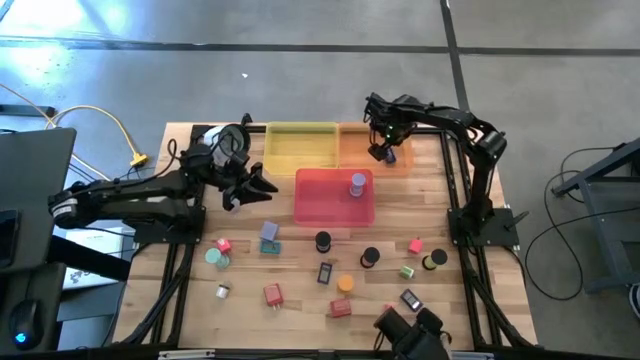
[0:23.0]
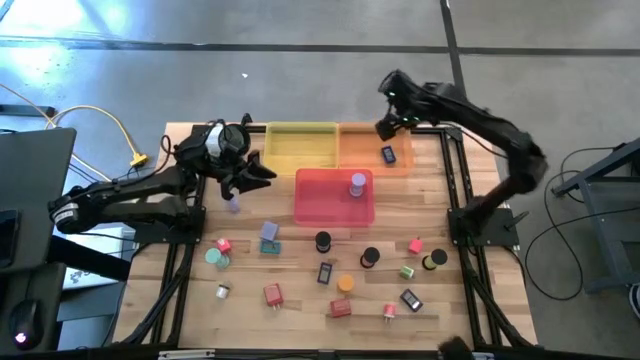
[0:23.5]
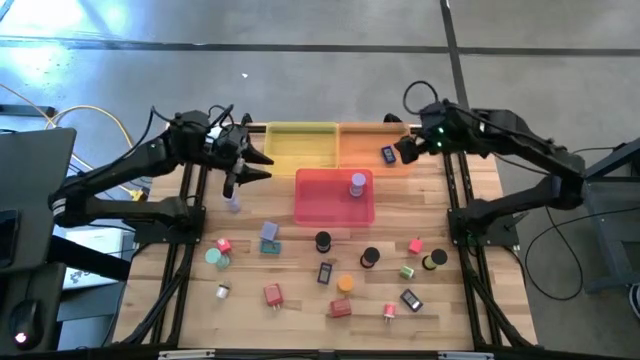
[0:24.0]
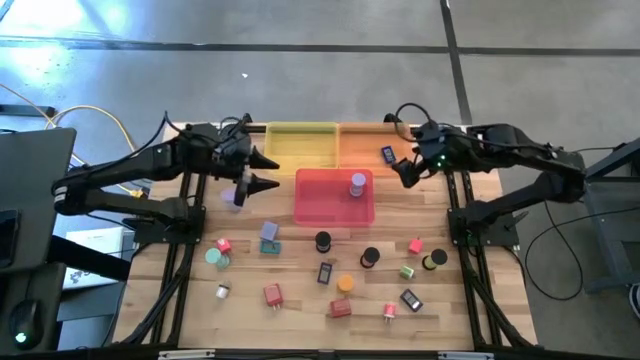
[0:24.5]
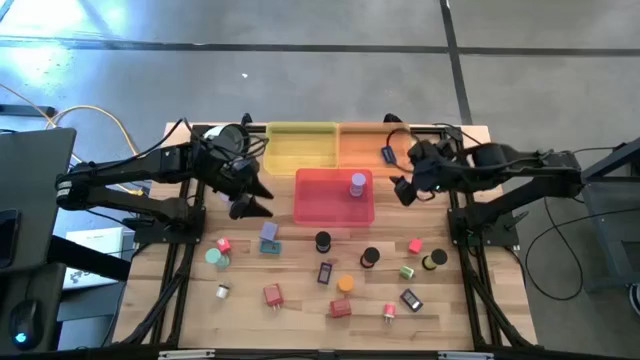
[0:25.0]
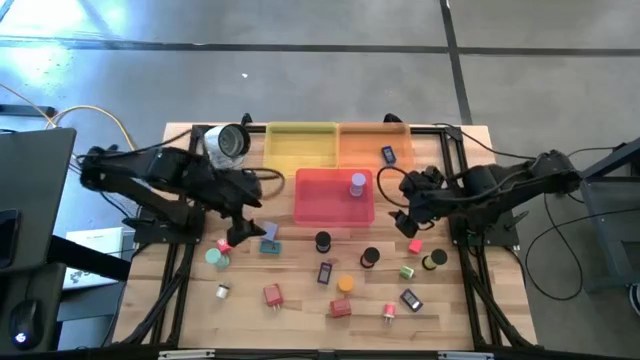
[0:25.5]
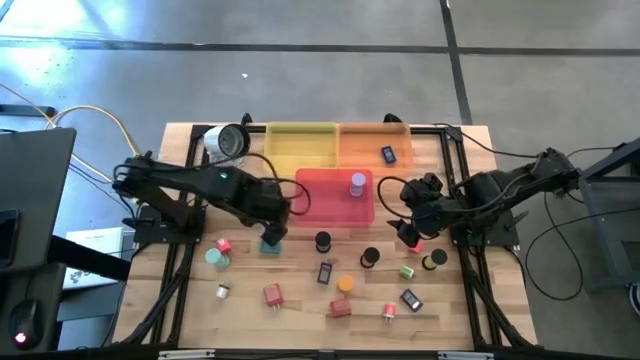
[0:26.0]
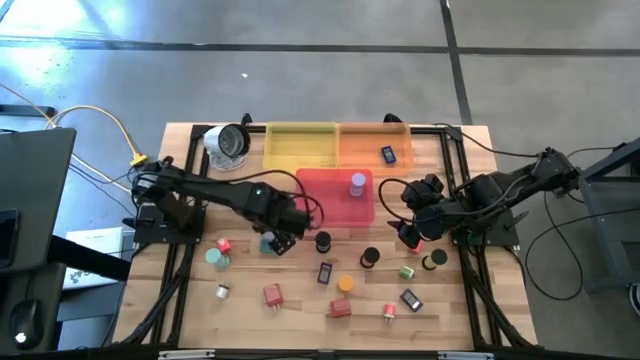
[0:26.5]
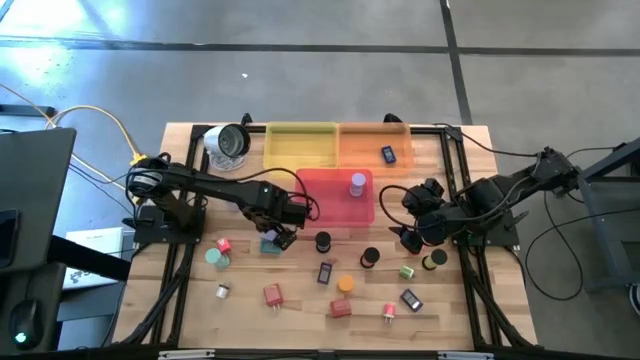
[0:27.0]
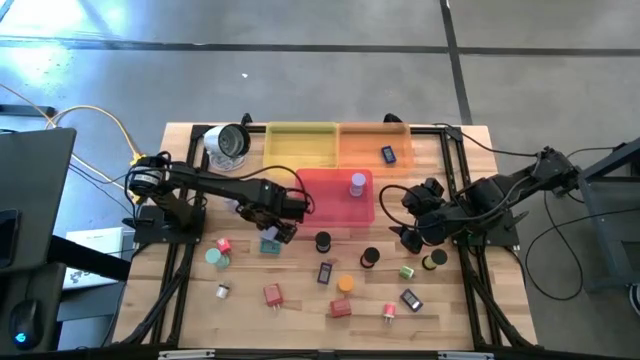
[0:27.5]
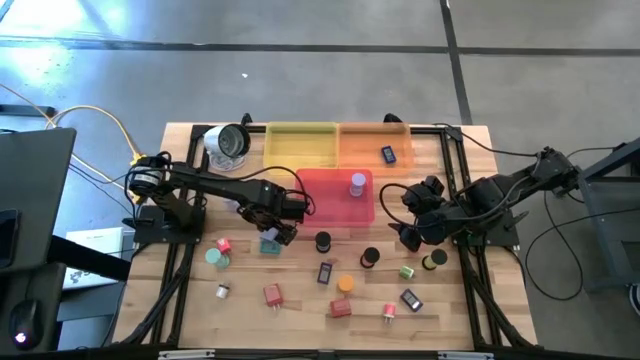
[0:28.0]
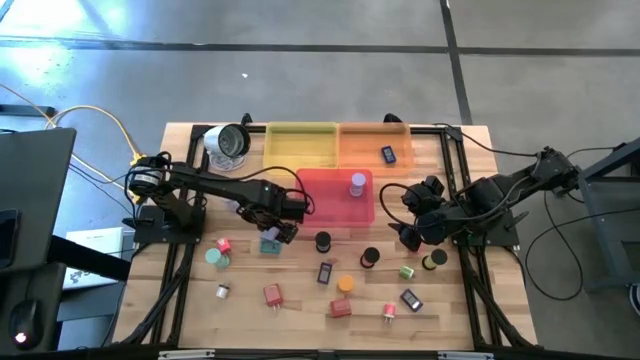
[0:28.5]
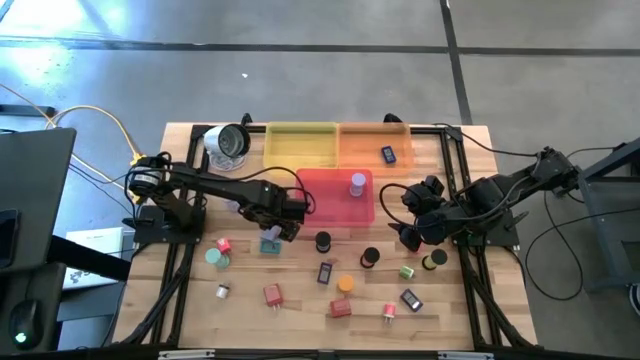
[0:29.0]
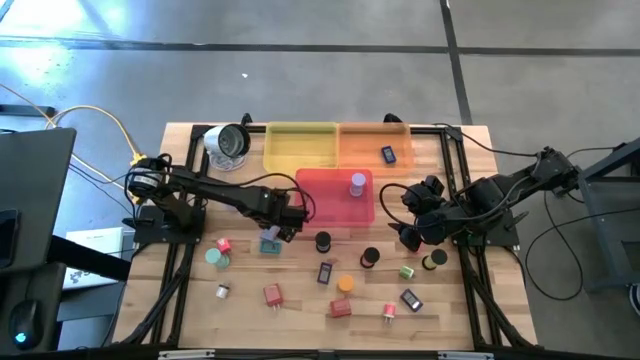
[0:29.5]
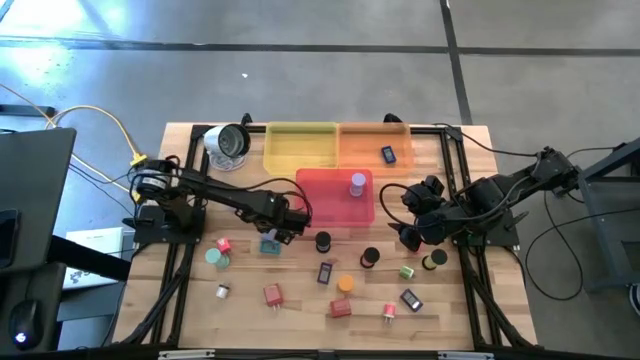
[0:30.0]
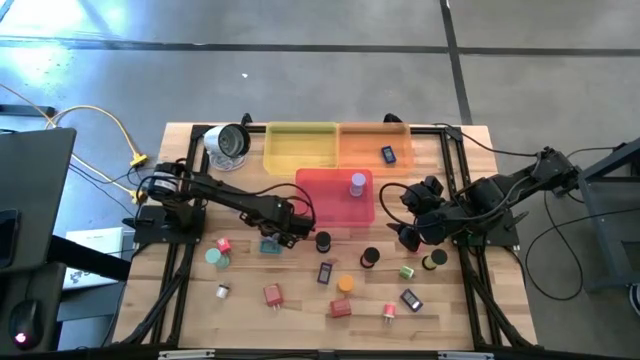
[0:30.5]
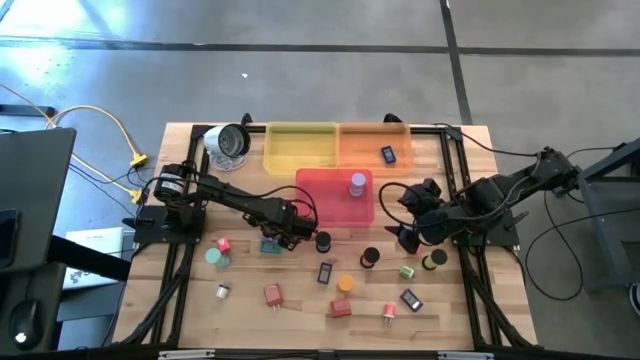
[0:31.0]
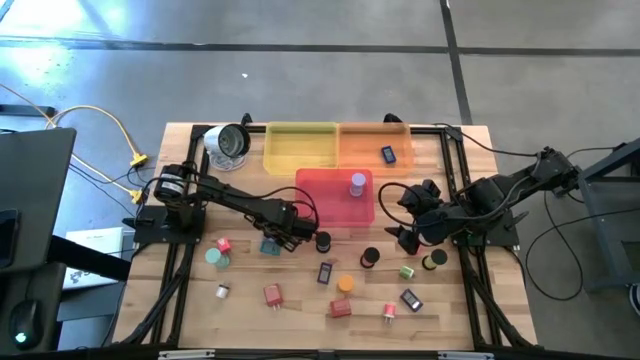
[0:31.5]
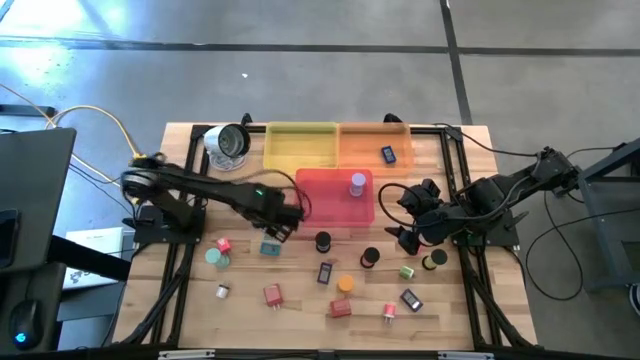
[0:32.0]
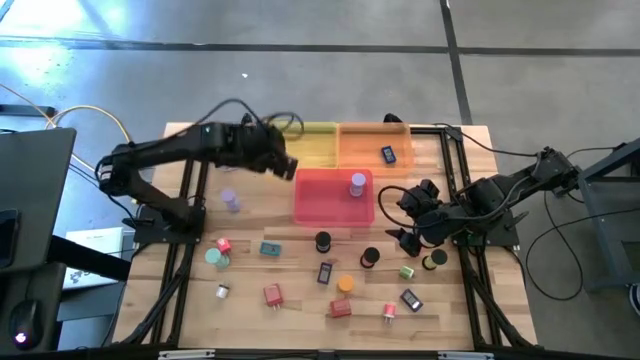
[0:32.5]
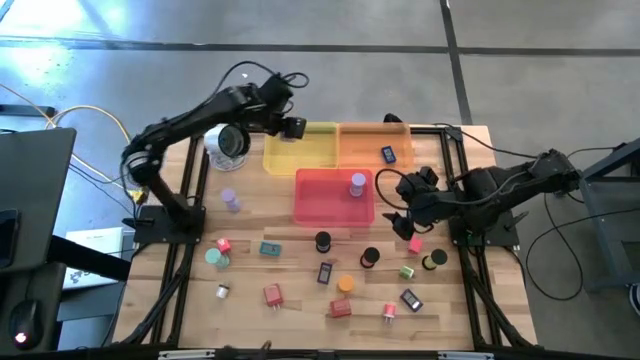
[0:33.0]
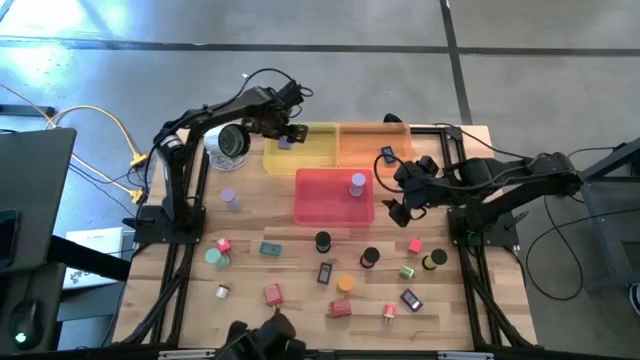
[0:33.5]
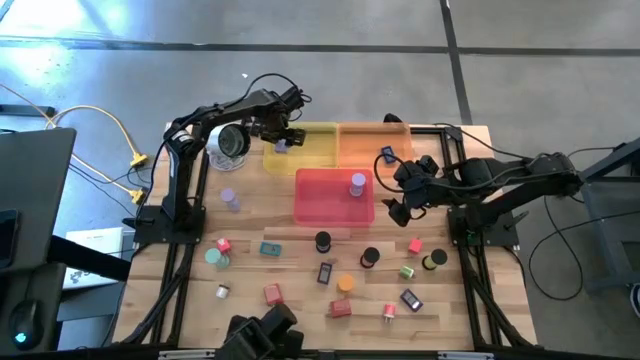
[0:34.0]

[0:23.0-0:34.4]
Task: Pick & Place Office items
Put the blue charger adapter into the yellow bin

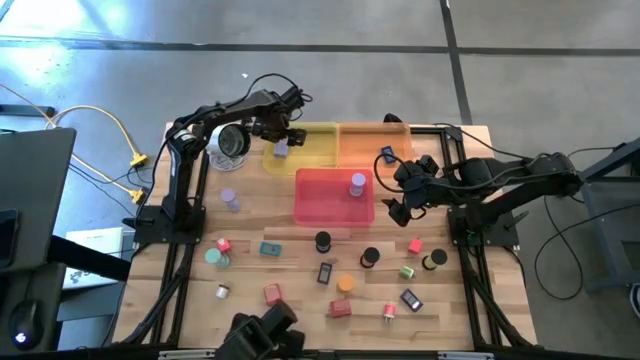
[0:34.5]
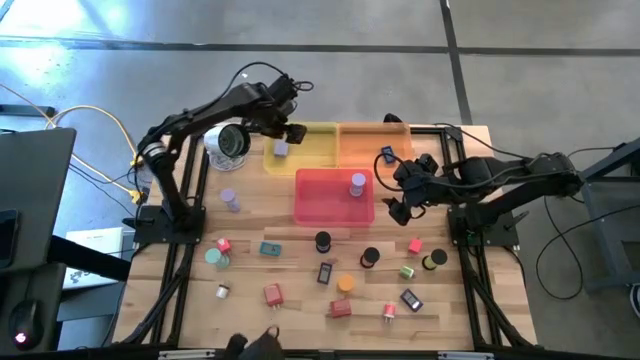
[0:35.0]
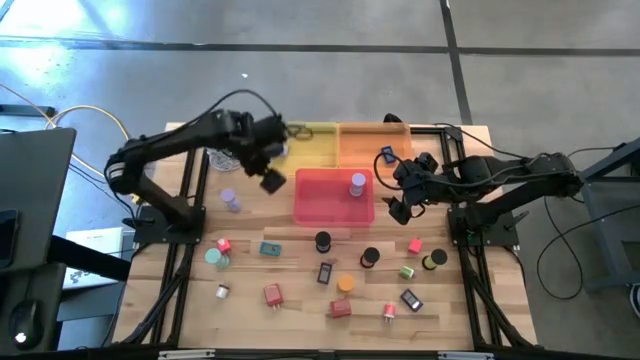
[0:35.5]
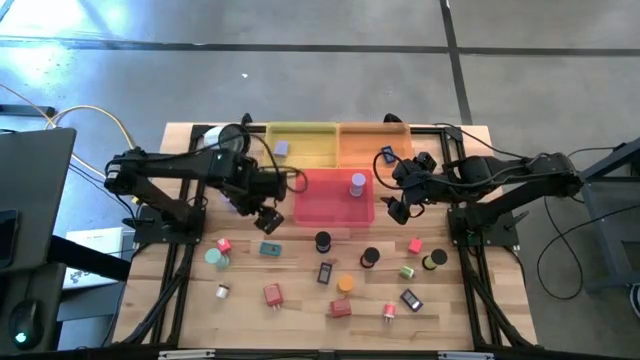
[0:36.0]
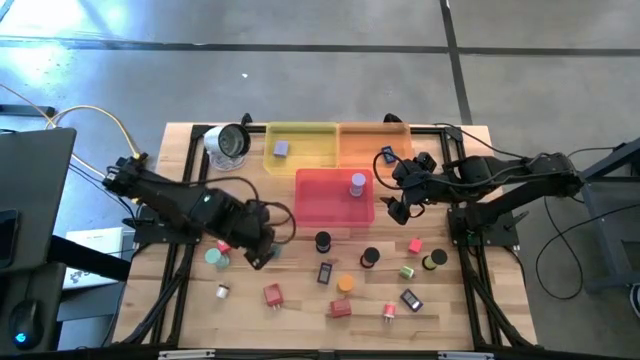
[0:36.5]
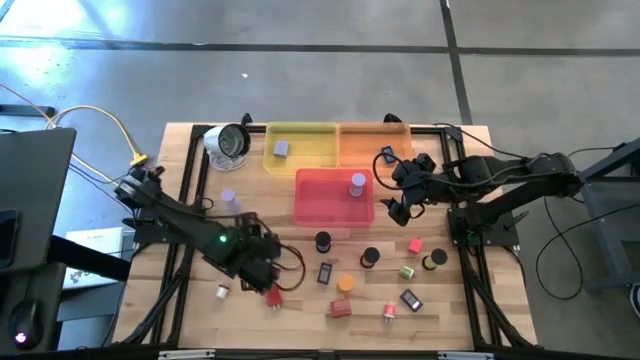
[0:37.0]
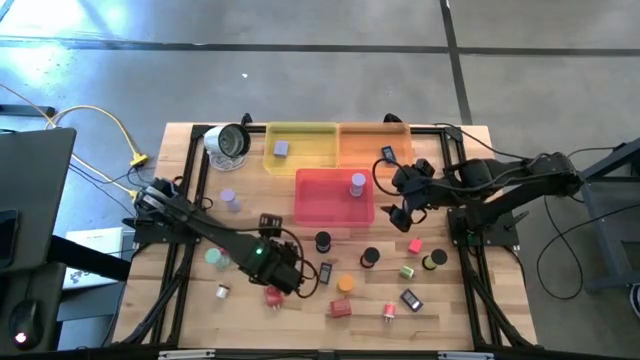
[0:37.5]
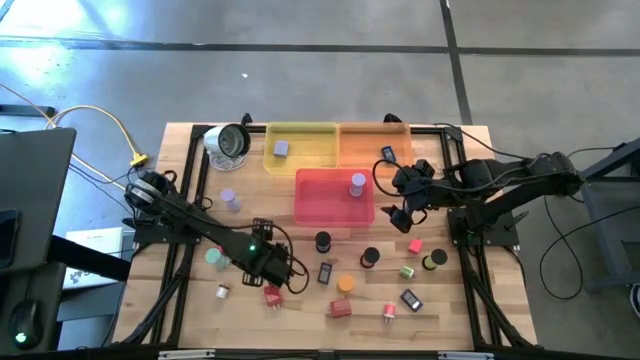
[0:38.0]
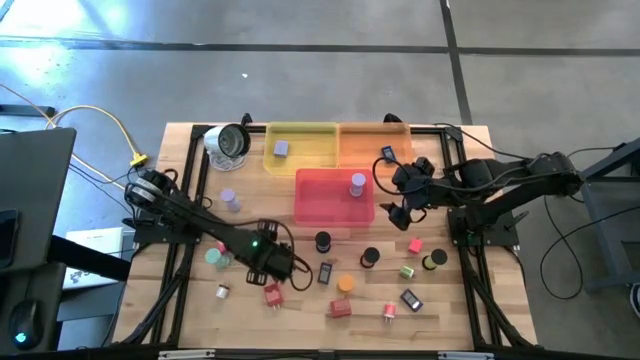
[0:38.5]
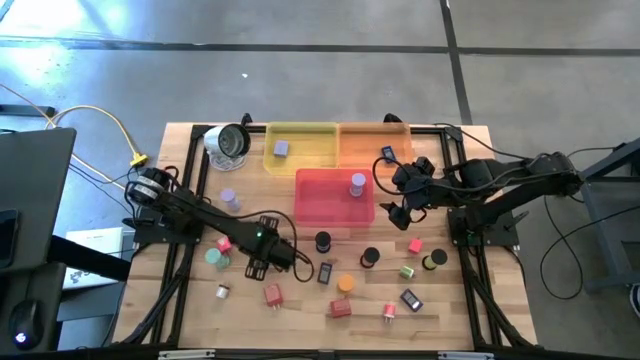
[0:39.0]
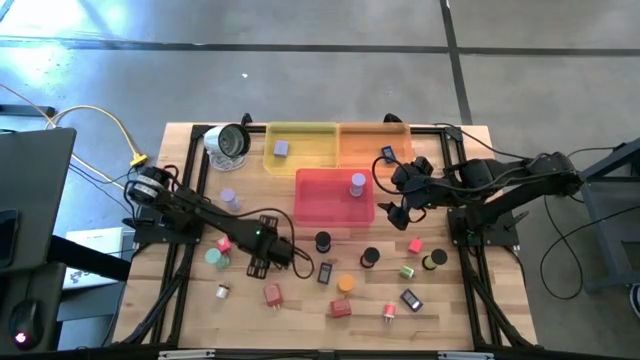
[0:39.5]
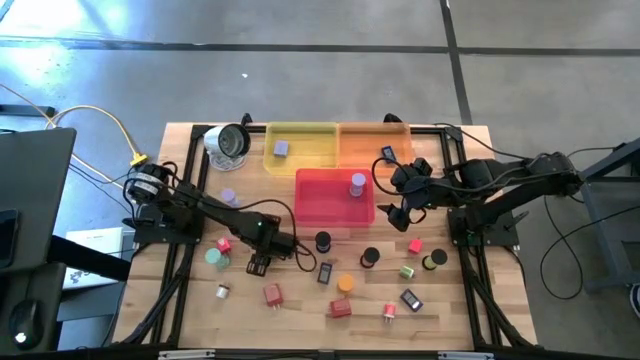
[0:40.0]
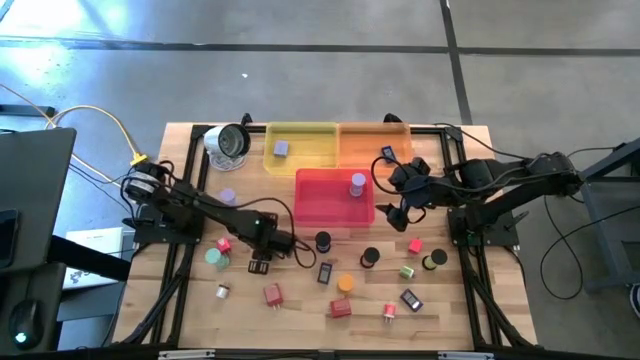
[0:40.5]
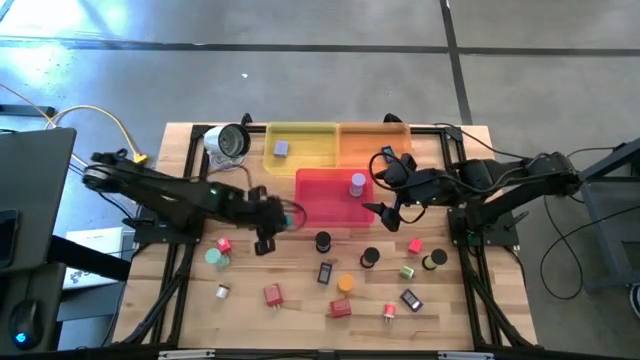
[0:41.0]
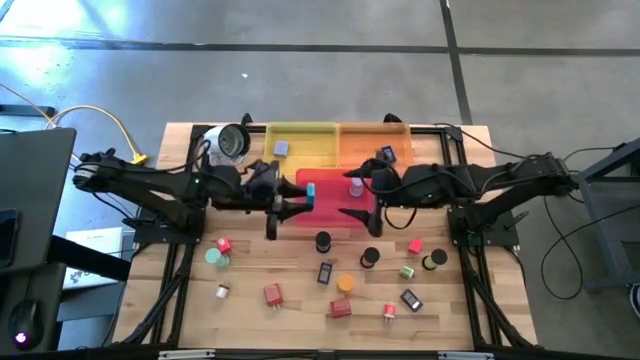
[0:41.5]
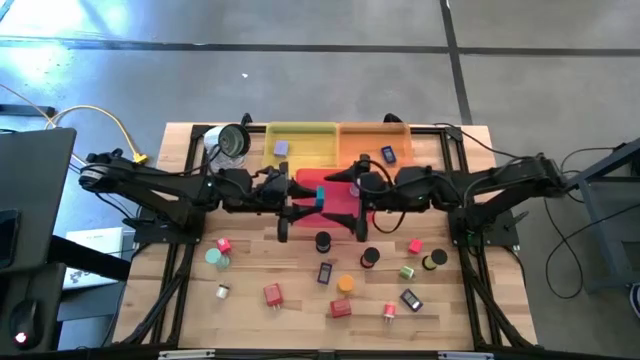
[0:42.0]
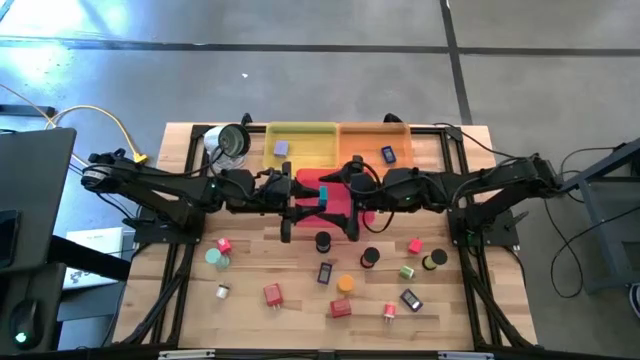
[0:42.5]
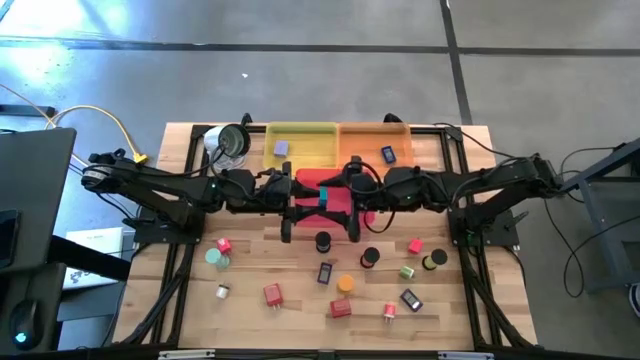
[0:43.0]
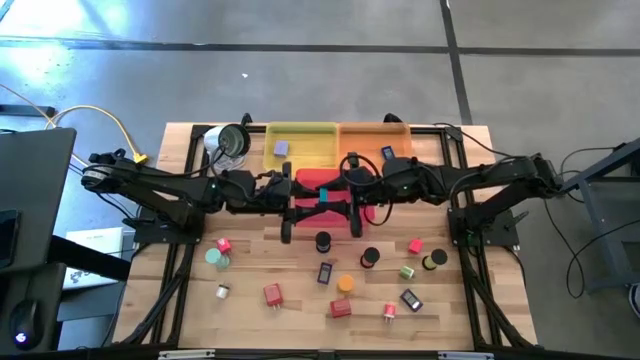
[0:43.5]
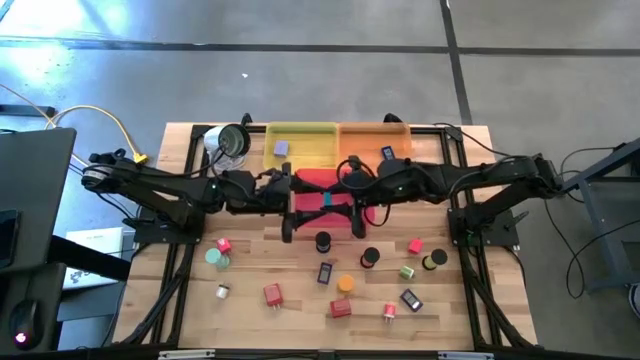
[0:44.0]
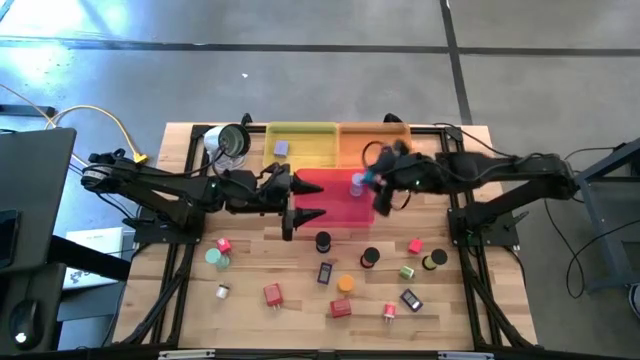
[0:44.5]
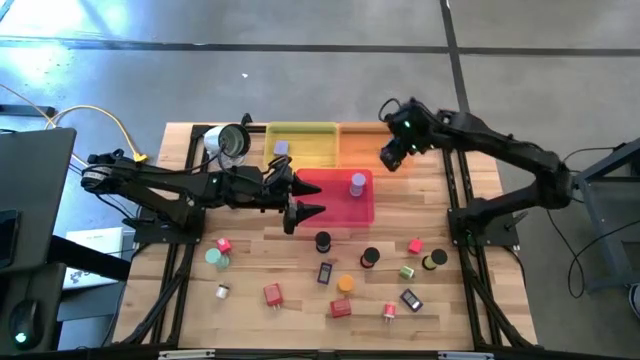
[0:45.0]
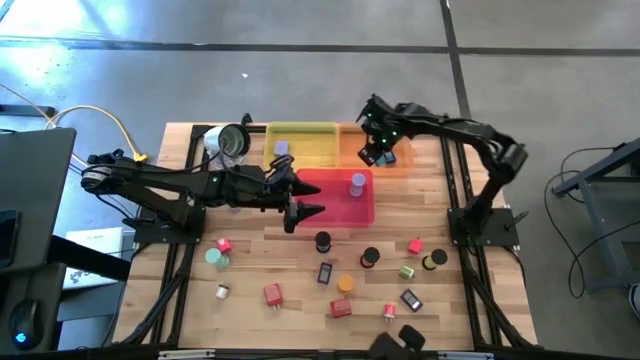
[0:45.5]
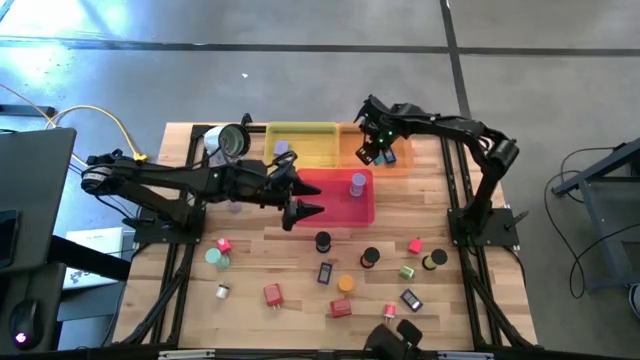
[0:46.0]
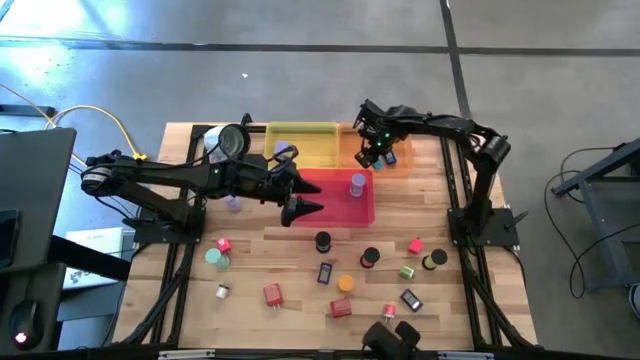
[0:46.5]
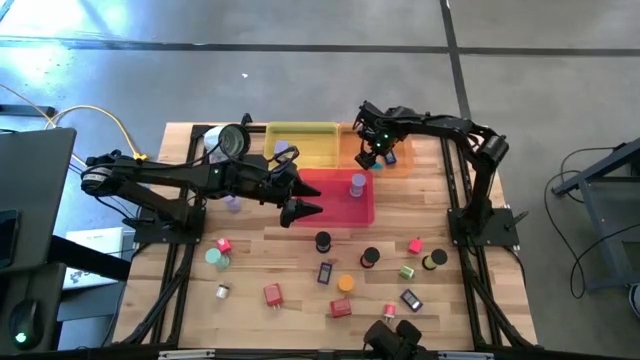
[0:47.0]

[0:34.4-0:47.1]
Put the light blue digital clock into the orange bin
